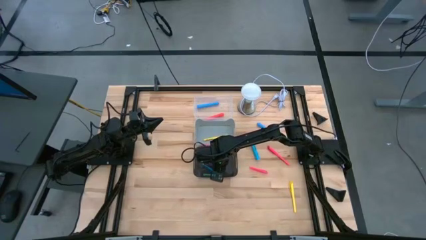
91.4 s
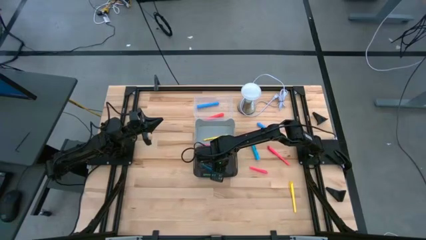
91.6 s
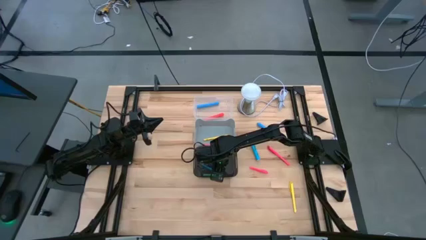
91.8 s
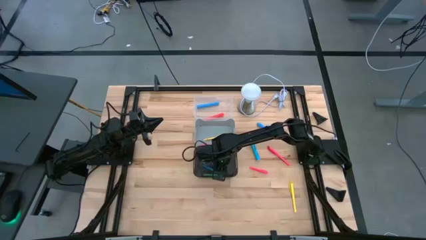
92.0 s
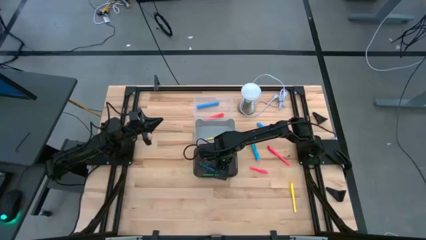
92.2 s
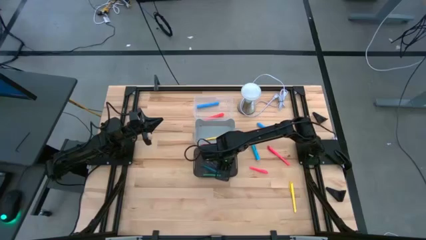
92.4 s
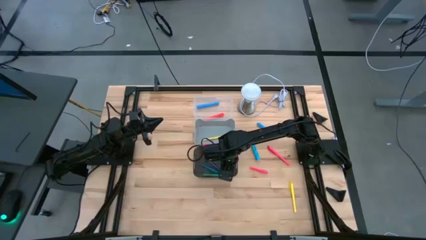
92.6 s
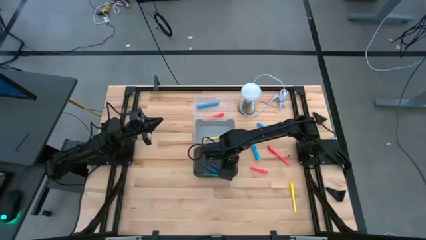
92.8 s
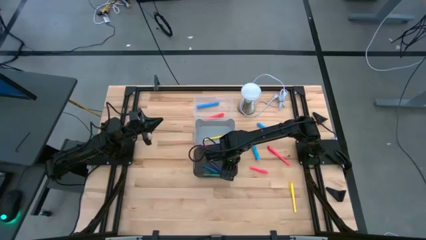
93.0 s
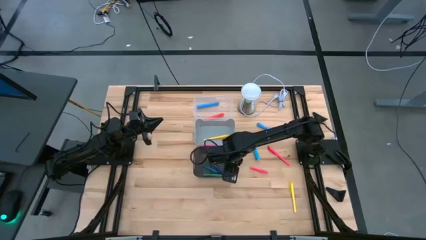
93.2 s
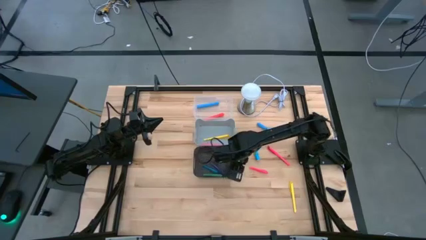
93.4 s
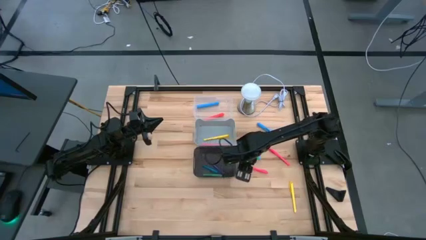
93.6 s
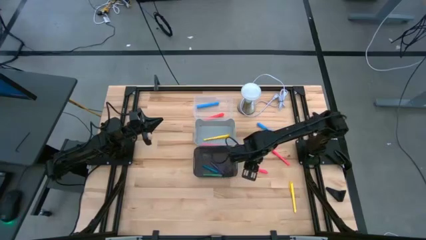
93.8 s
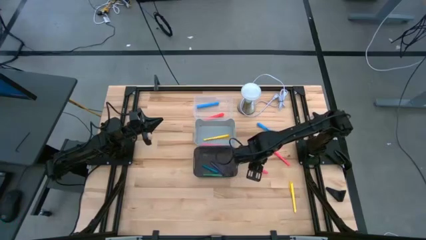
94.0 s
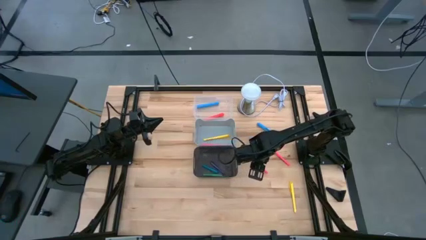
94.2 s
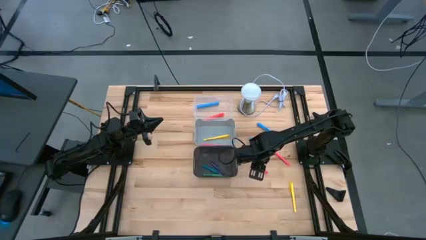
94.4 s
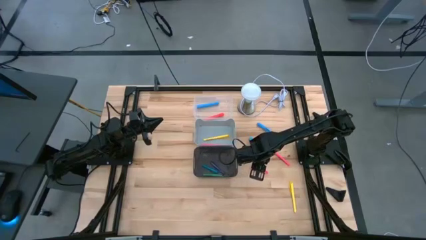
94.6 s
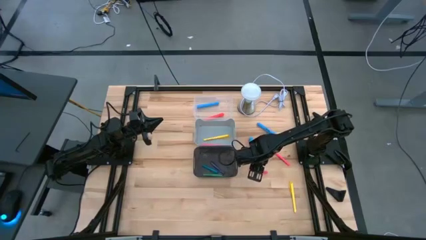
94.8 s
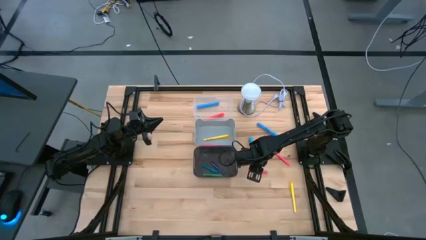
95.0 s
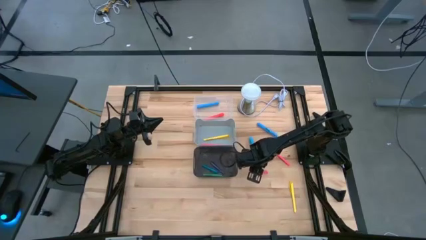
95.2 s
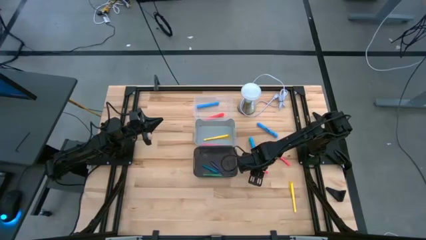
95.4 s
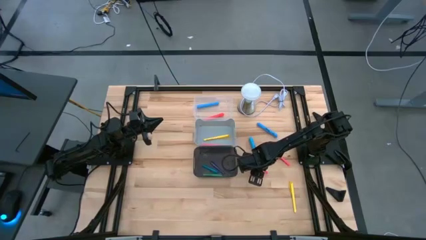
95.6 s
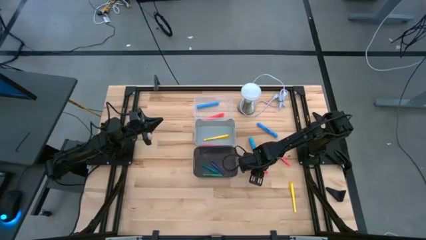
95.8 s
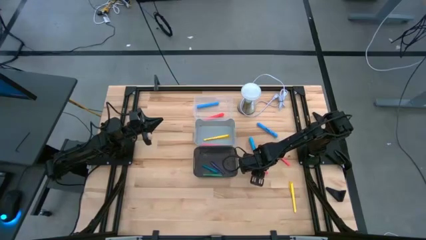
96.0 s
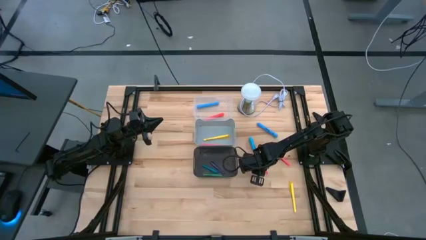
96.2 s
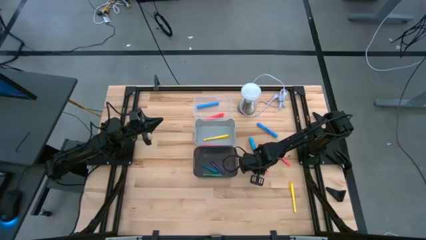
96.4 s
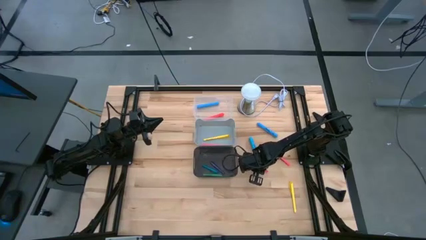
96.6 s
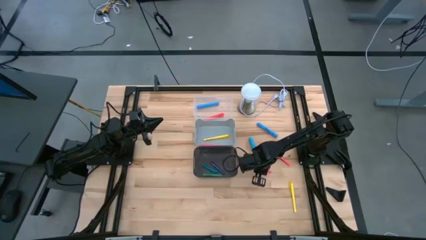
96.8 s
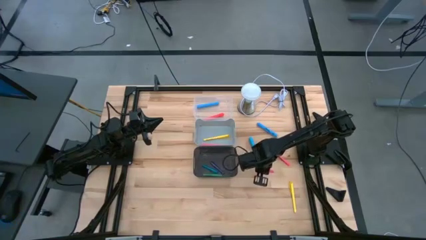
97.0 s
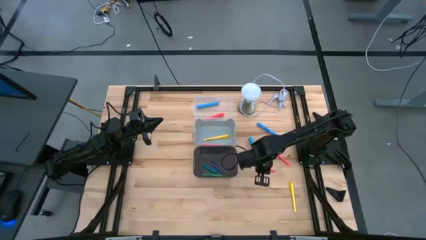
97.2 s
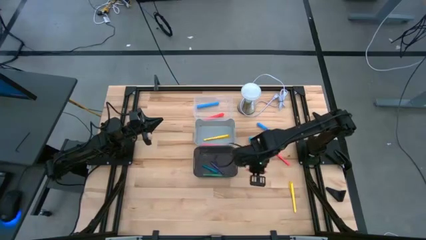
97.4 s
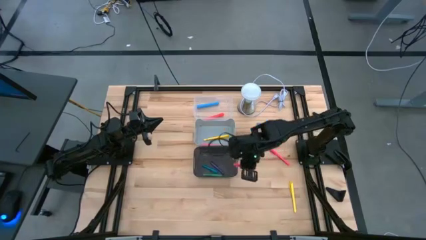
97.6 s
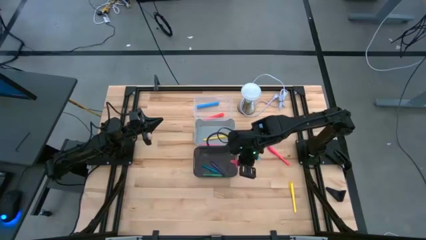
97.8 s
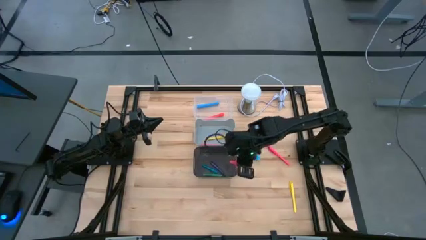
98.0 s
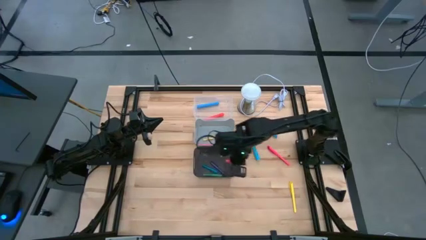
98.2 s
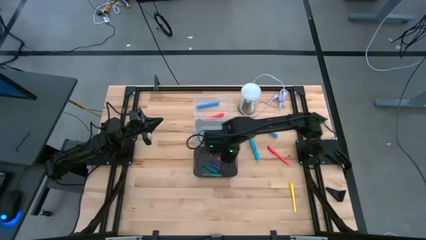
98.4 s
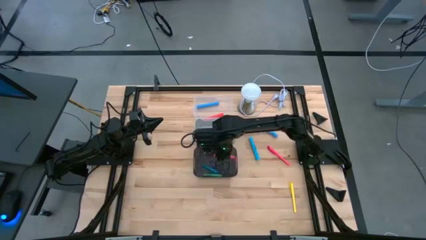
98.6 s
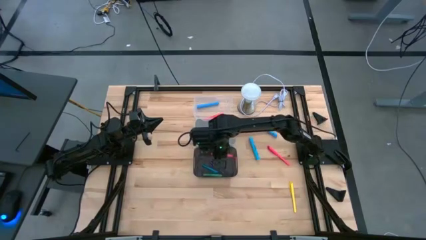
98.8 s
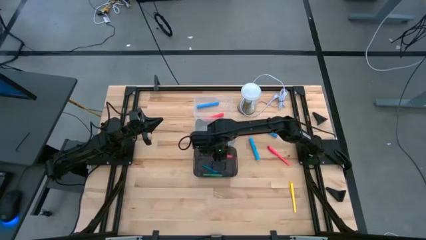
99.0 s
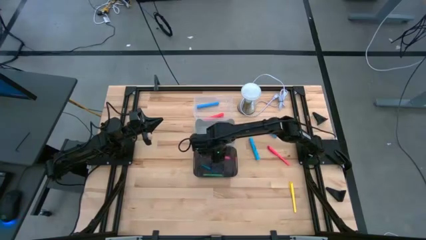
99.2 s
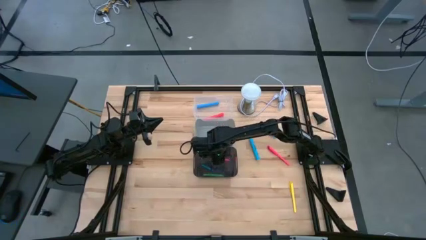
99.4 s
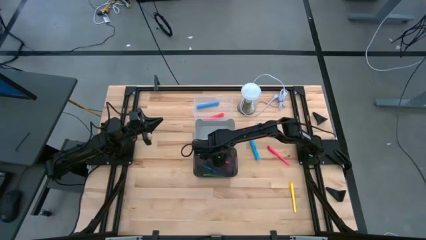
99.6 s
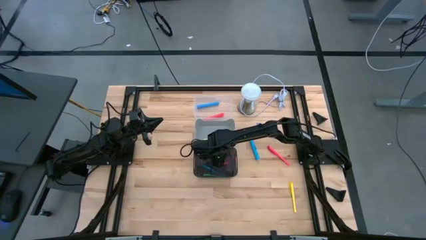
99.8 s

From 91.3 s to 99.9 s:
Task: Pick & Place Markers
Put the pink pen into the black bin

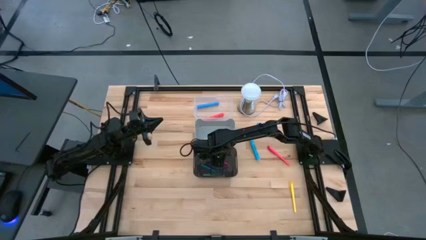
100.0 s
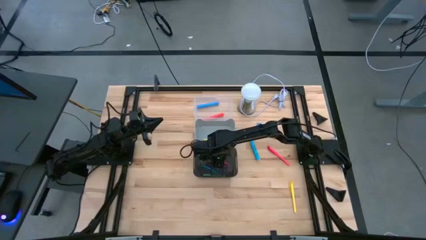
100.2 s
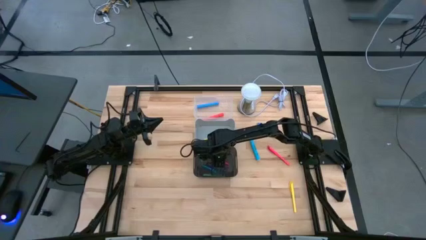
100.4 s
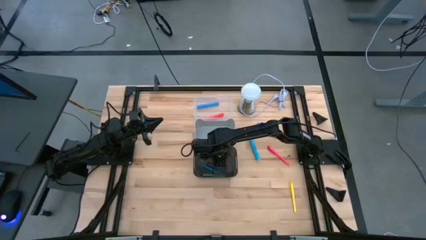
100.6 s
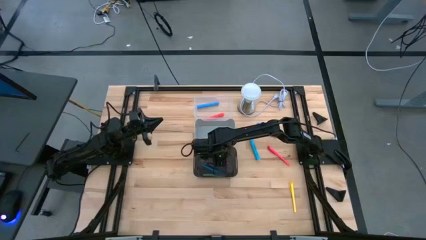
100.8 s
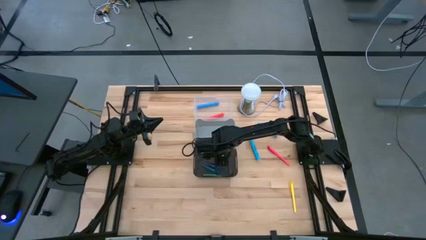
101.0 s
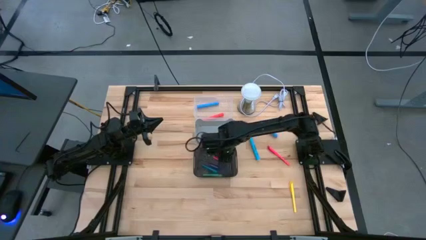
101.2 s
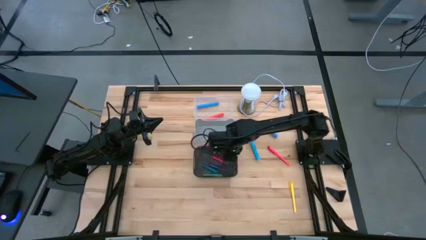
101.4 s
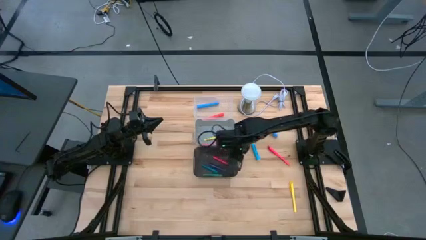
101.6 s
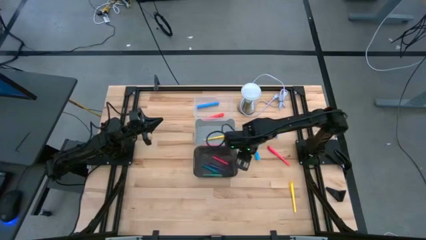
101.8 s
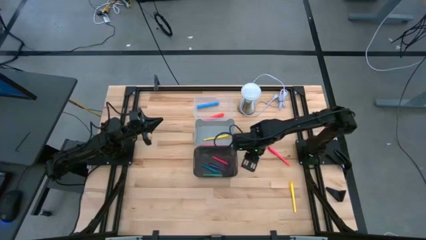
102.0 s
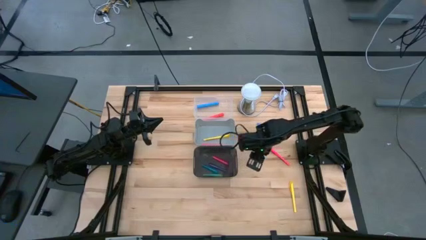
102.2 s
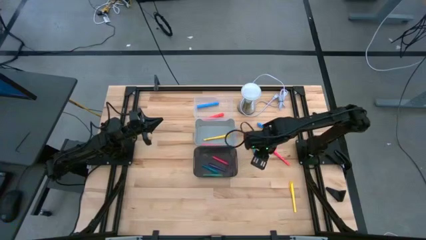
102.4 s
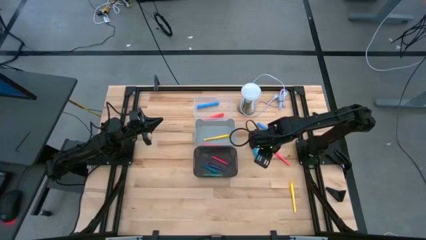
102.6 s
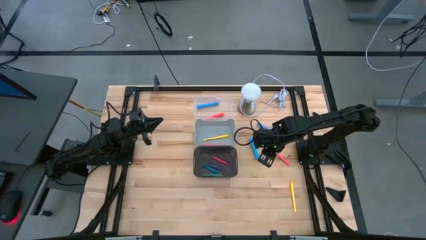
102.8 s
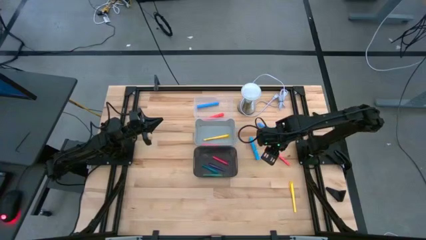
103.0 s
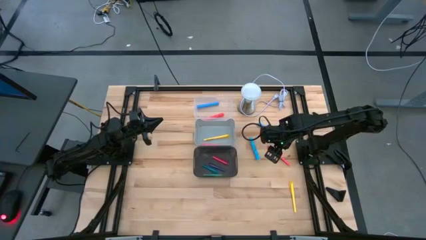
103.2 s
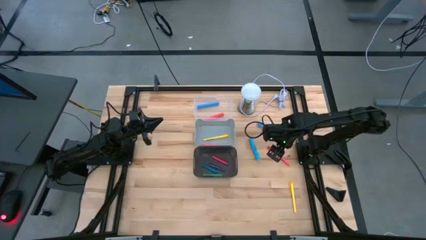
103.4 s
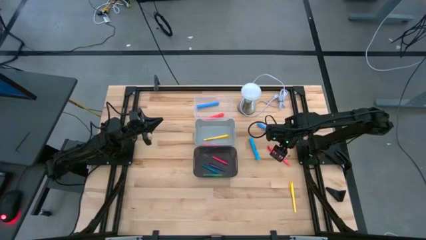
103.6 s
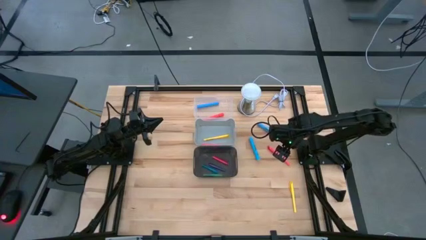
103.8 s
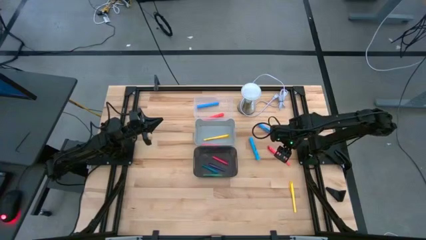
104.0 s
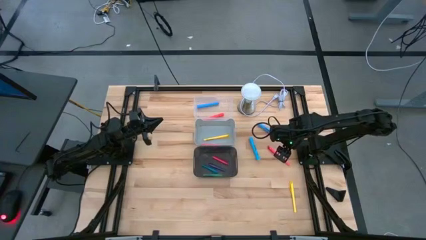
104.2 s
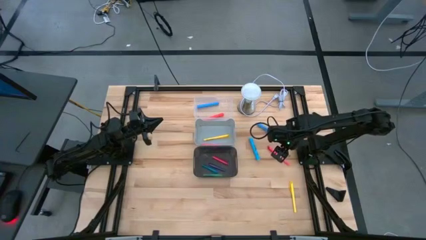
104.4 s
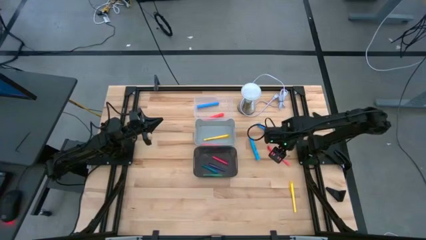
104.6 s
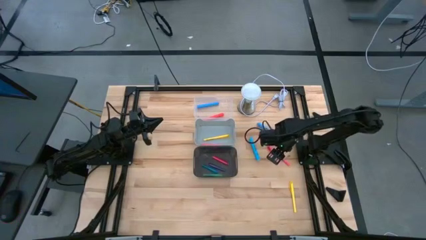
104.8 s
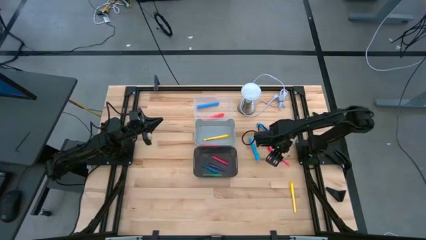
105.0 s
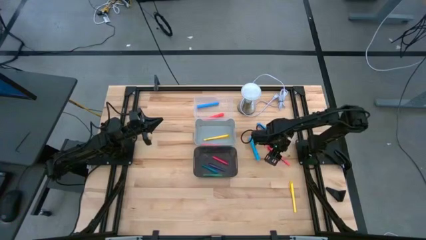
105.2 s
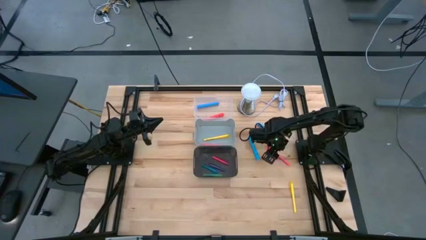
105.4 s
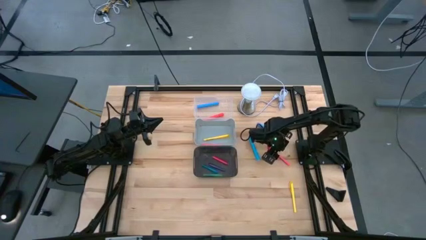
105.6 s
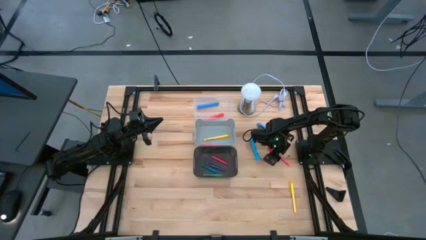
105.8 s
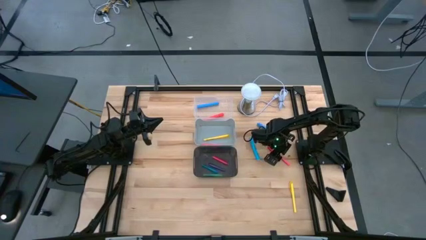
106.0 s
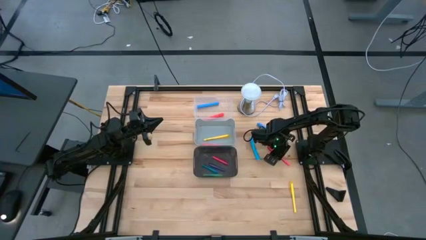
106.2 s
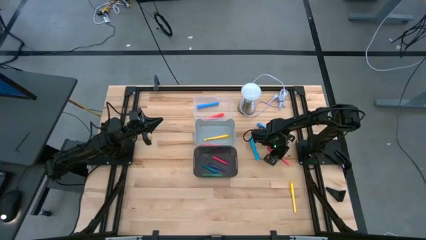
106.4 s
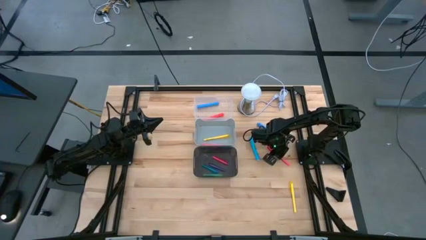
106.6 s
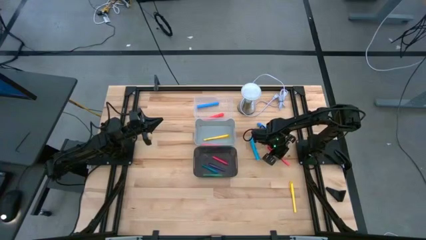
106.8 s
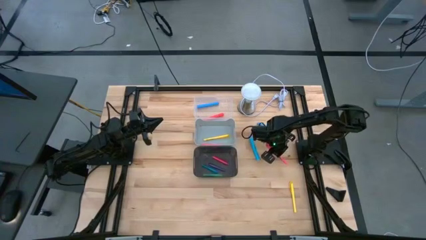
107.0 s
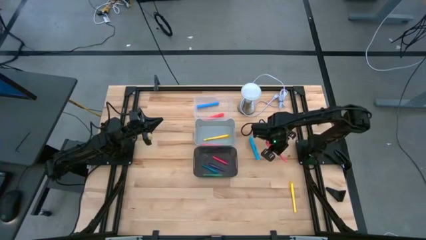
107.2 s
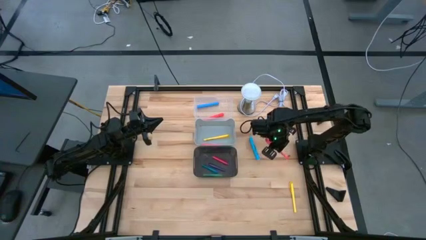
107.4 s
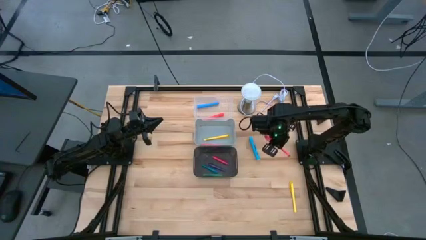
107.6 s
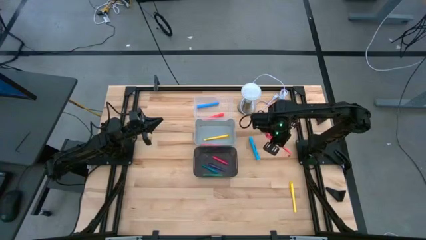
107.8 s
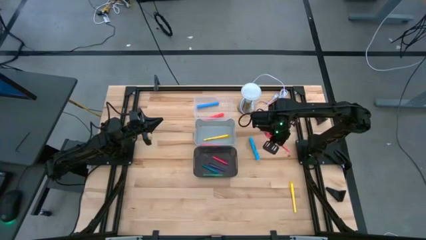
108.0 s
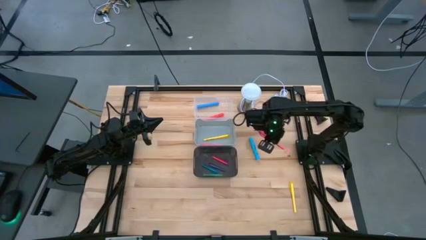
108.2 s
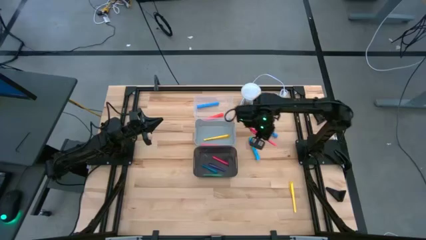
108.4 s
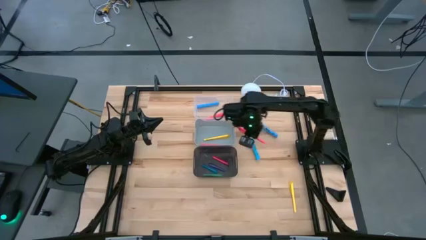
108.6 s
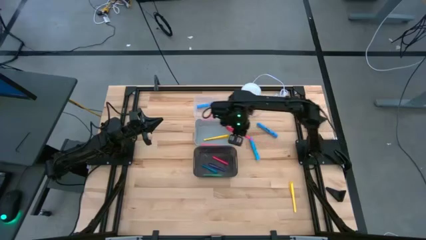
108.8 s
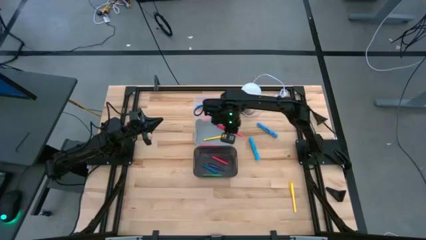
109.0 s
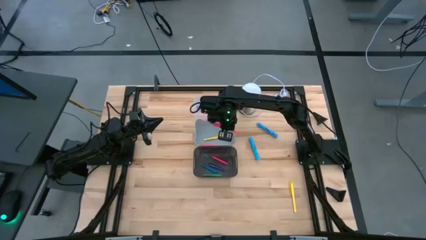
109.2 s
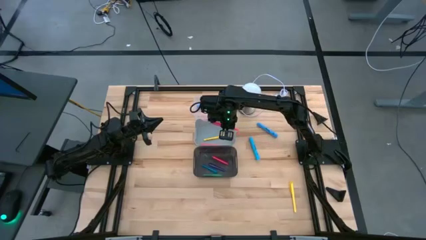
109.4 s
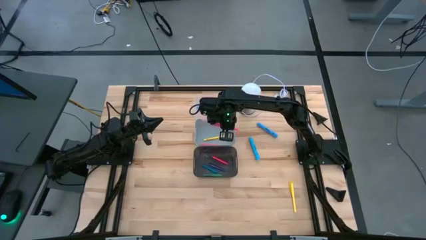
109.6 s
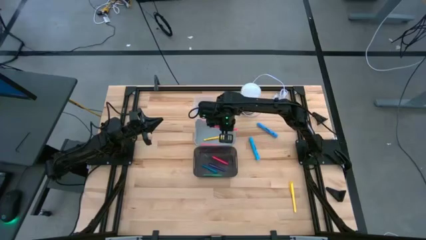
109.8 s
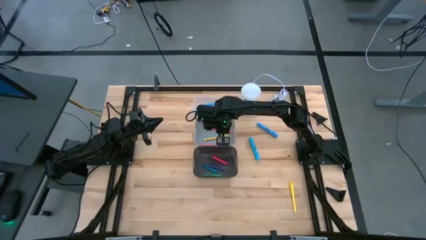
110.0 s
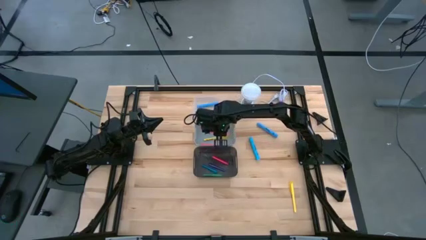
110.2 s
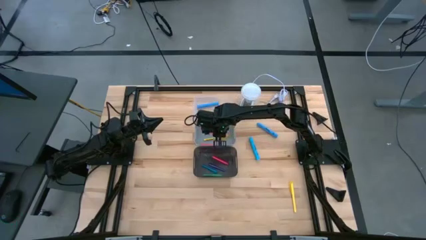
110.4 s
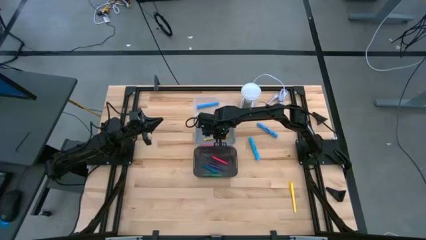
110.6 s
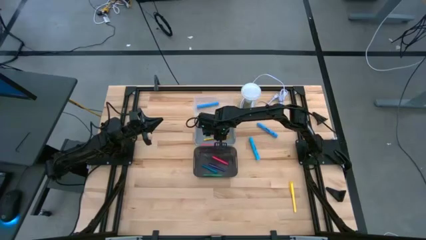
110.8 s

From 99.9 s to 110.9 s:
Put the pink marker into the transparent bin
